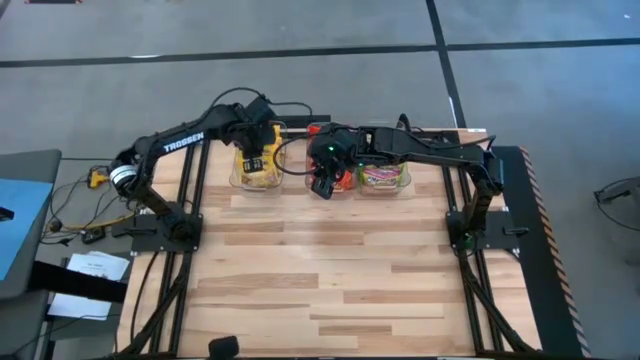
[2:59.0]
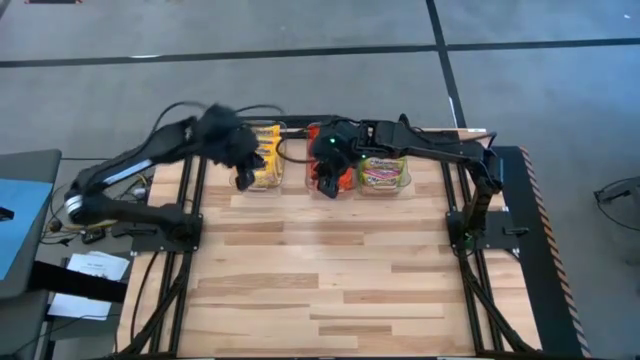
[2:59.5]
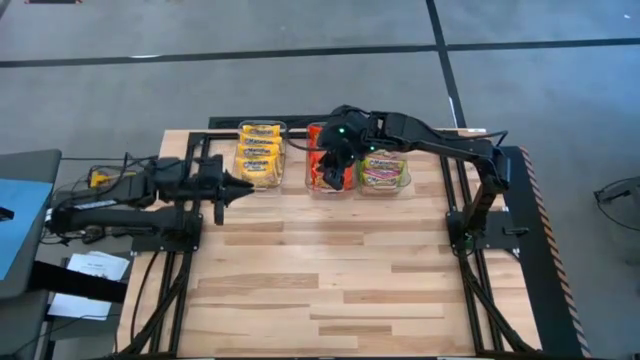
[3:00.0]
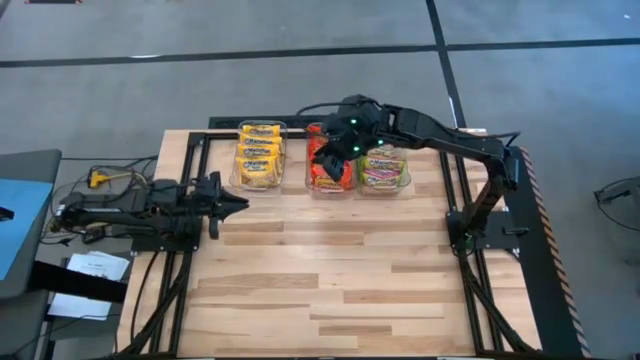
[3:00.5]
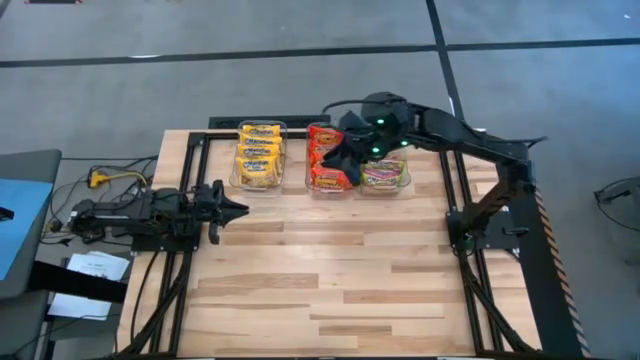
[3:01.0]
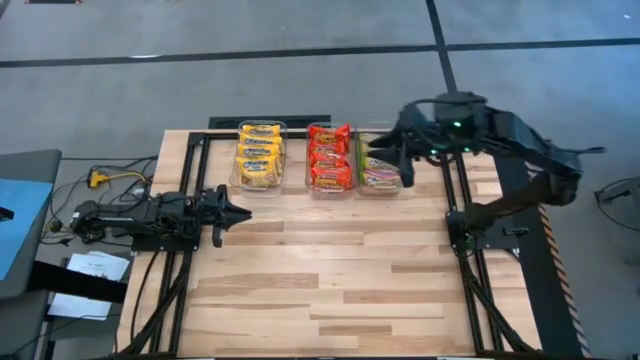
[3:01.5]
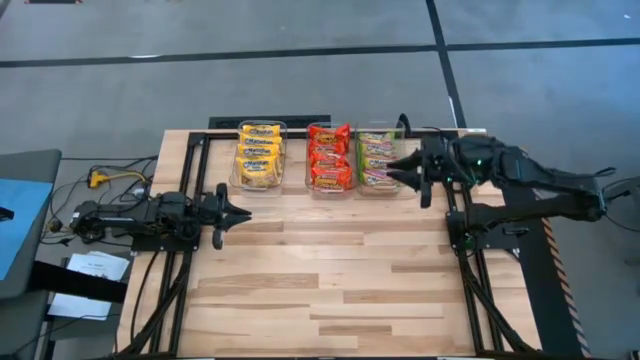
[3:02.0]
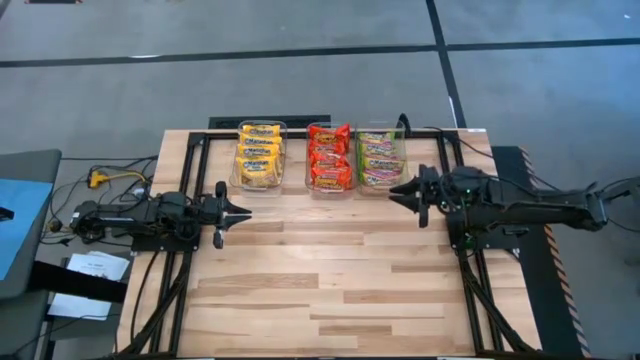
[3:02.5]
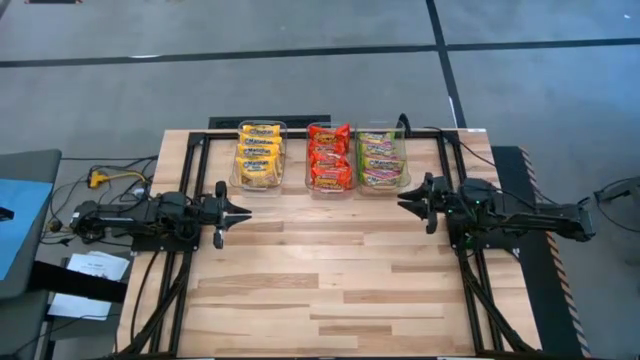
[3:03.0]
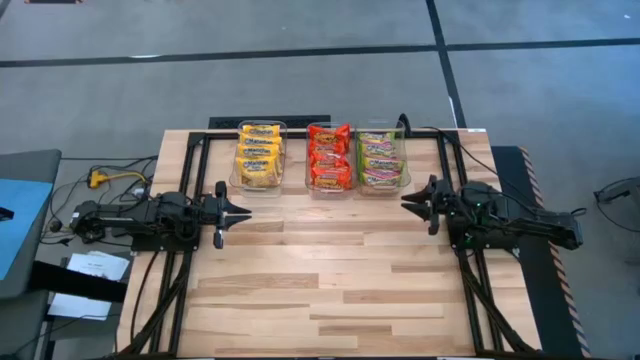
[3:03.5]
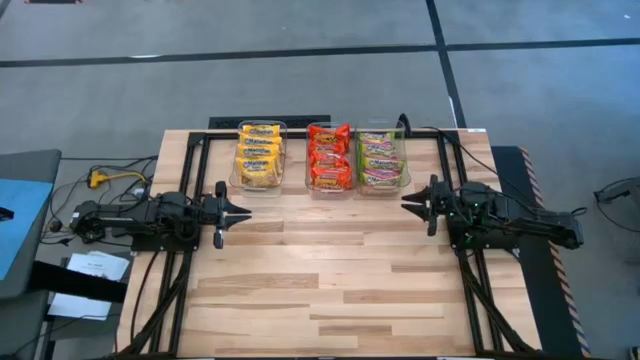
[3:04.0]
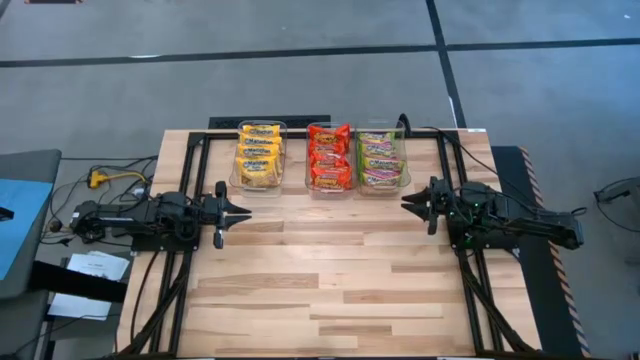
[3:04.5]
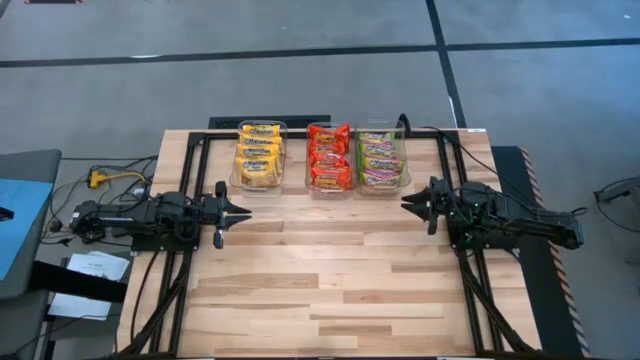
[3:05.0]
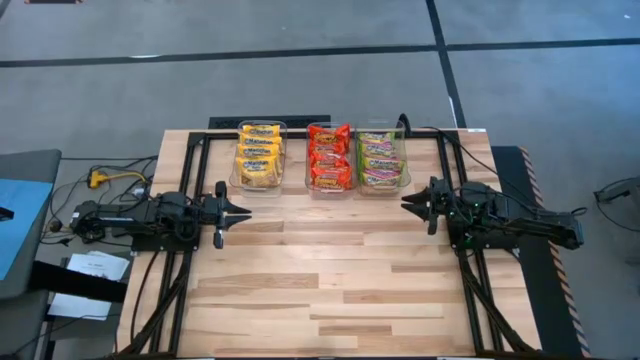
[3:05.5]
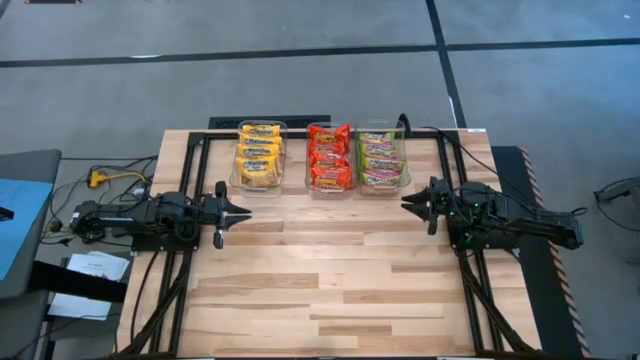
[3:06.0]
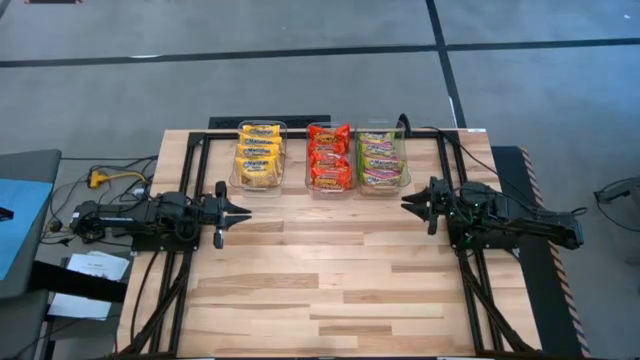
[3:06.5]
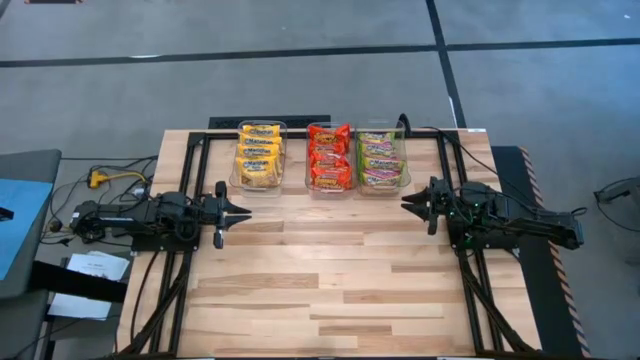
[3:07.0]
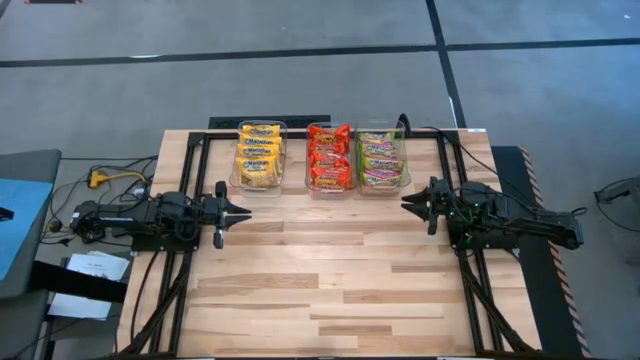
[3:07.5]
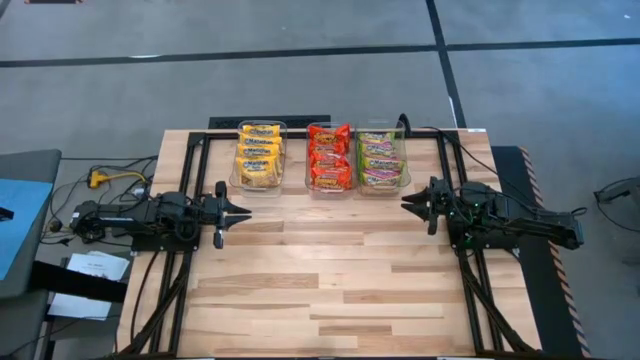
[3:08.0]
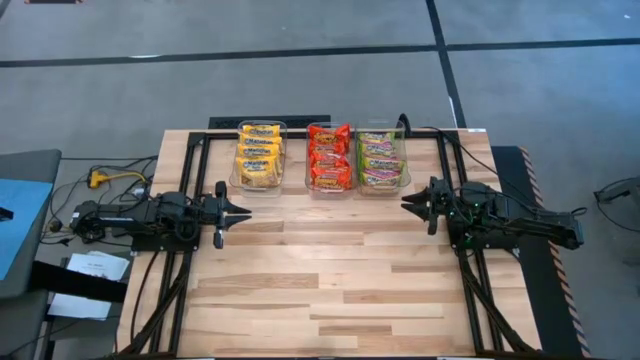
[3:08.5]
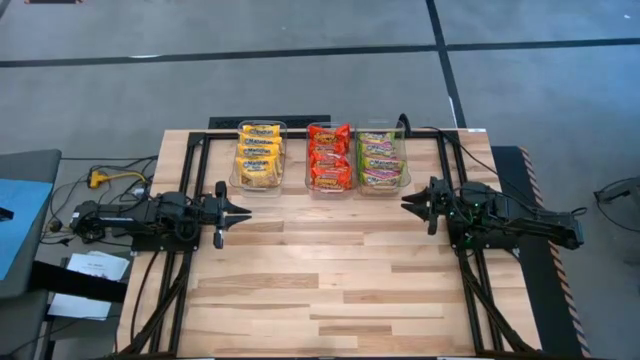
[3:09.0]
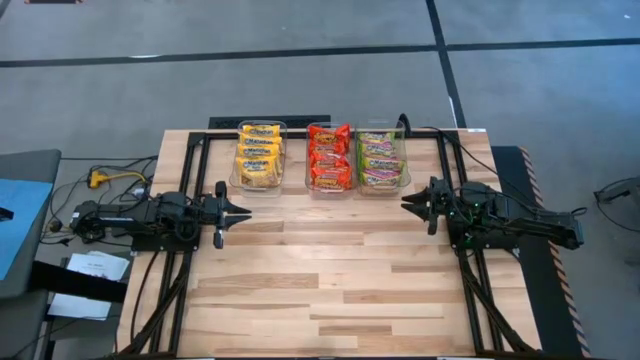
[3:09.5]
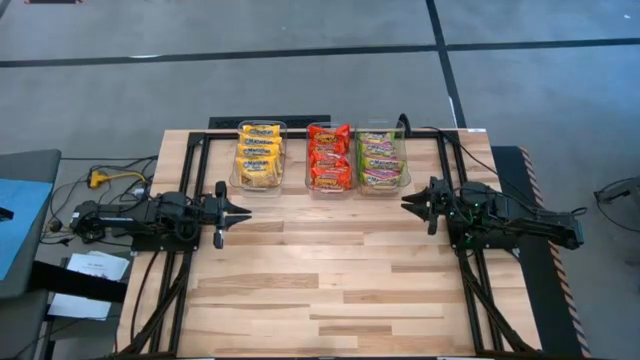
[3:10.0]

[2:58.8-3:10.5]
Task: Sort Maruchan noodles
Return to Home Position

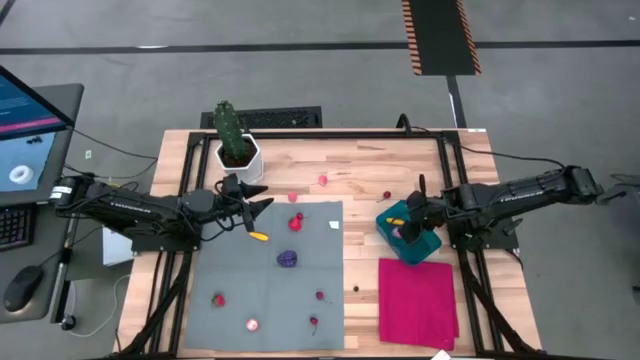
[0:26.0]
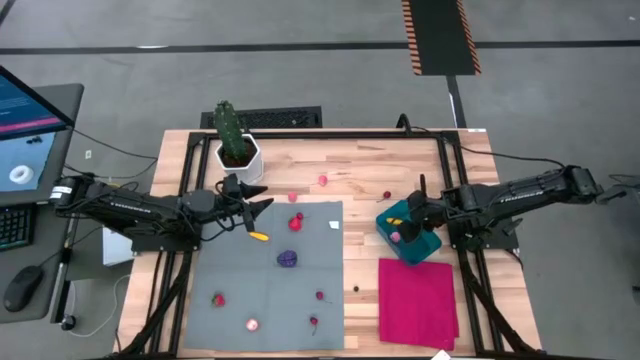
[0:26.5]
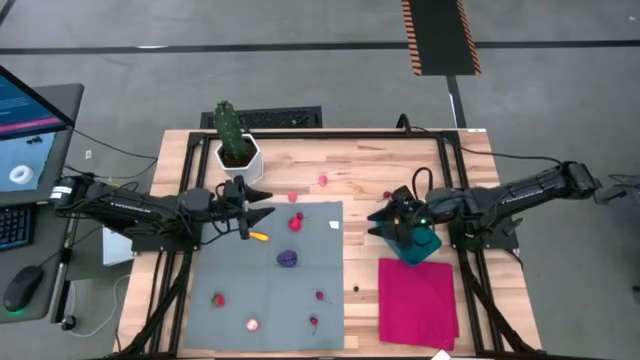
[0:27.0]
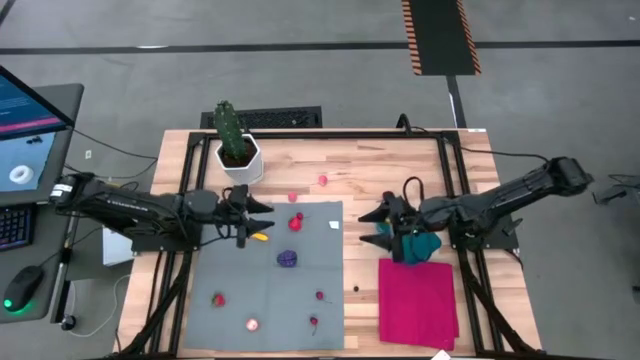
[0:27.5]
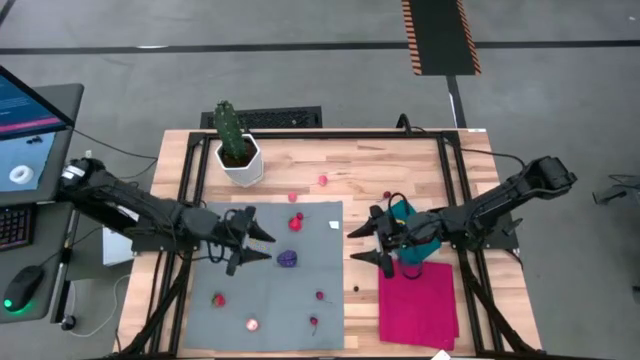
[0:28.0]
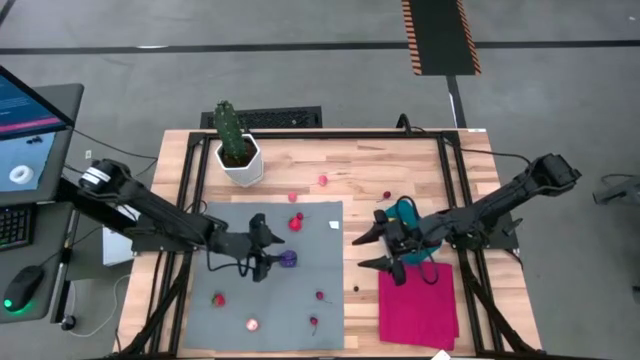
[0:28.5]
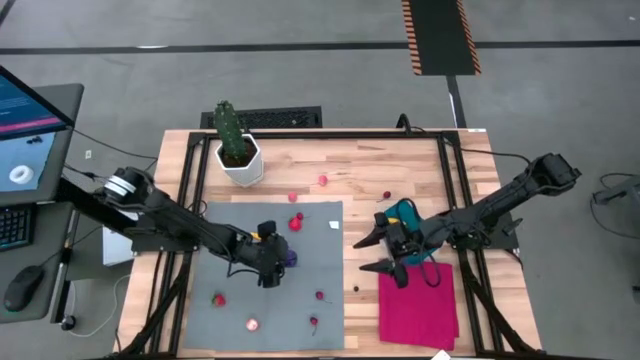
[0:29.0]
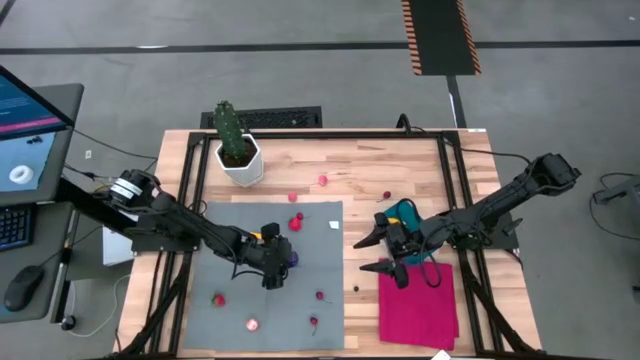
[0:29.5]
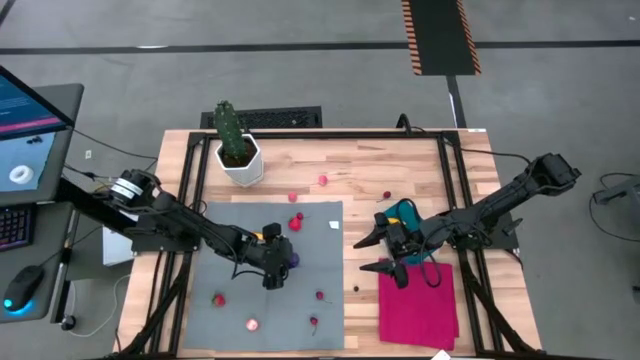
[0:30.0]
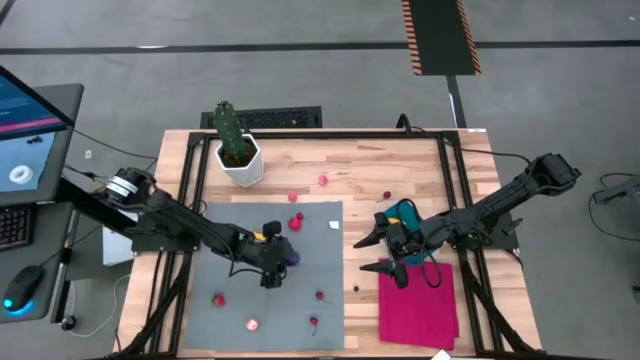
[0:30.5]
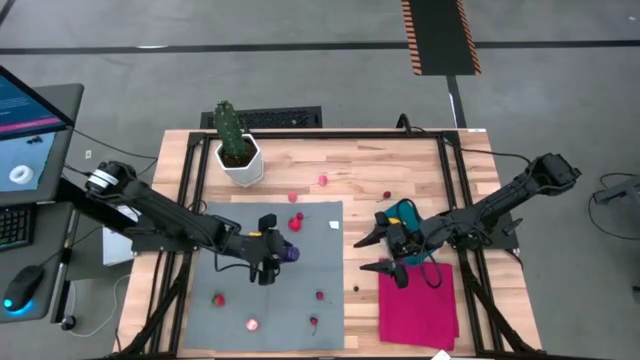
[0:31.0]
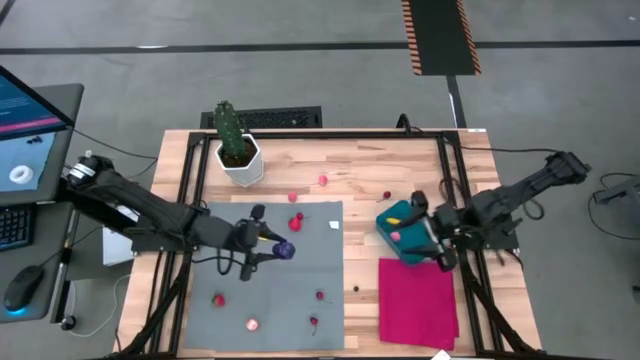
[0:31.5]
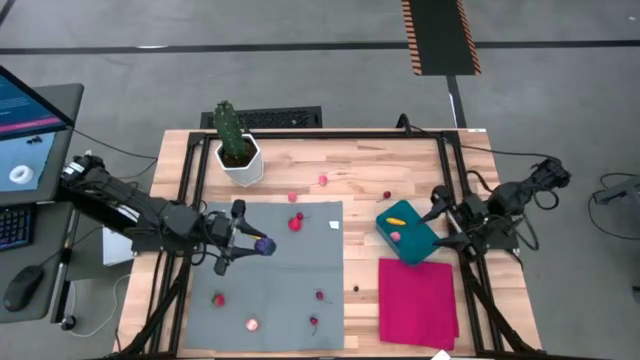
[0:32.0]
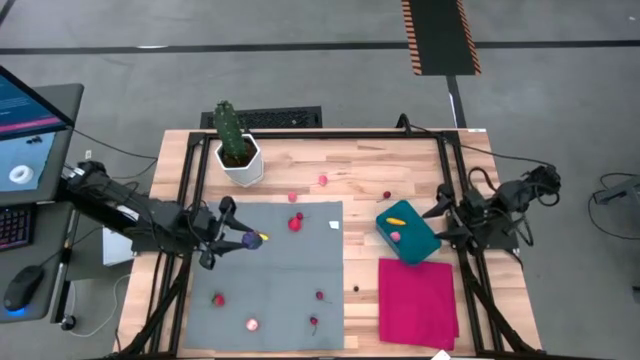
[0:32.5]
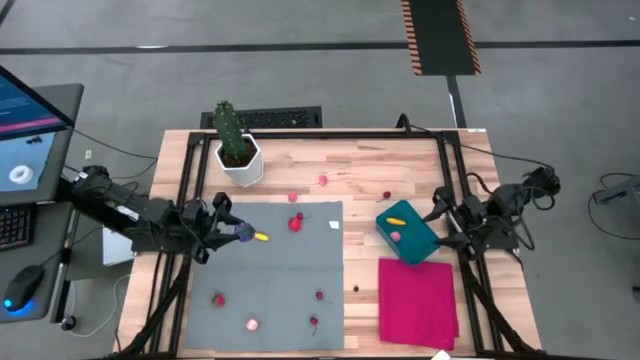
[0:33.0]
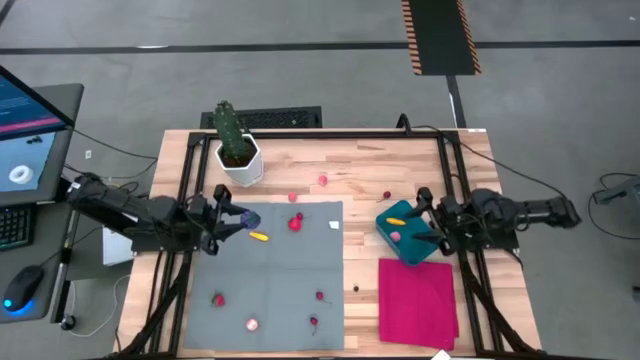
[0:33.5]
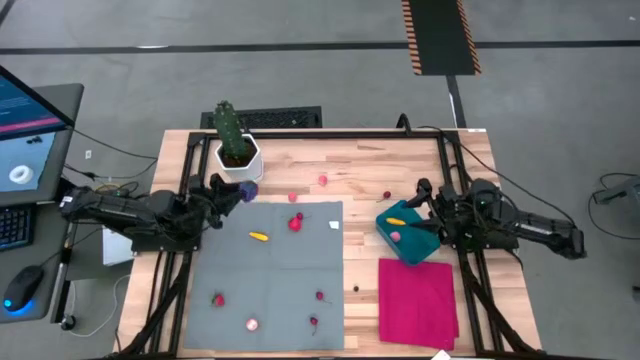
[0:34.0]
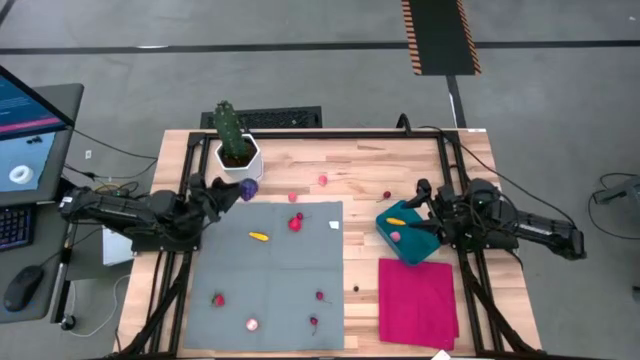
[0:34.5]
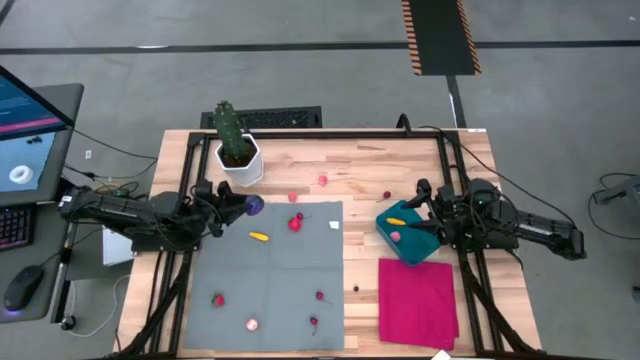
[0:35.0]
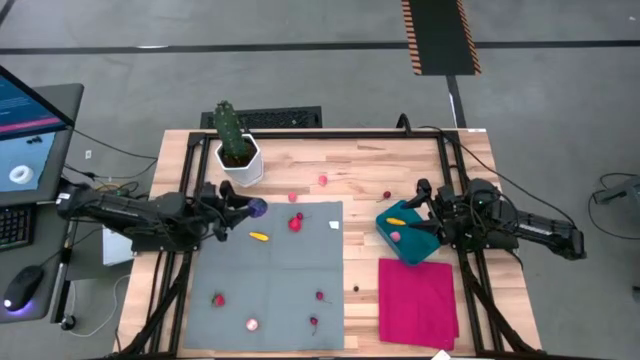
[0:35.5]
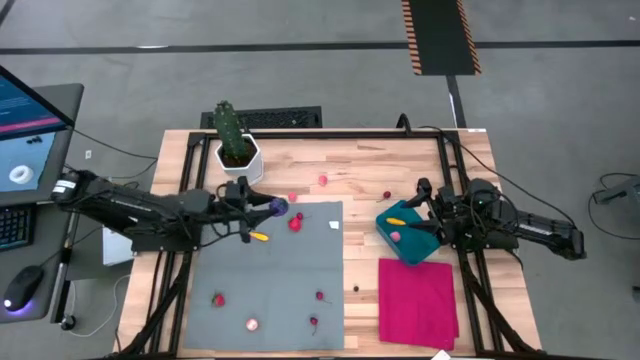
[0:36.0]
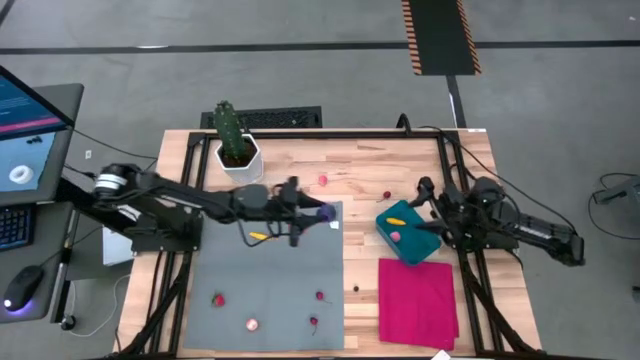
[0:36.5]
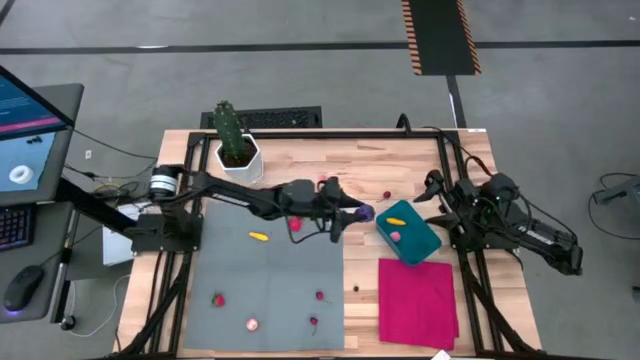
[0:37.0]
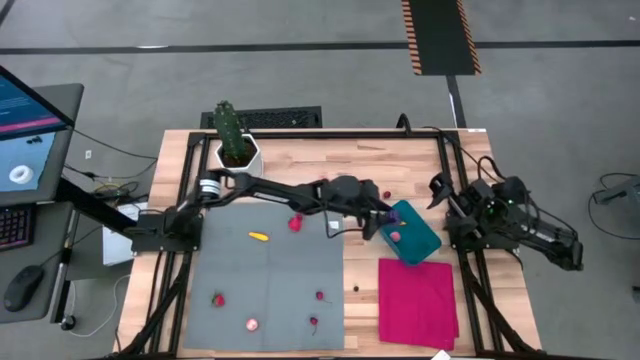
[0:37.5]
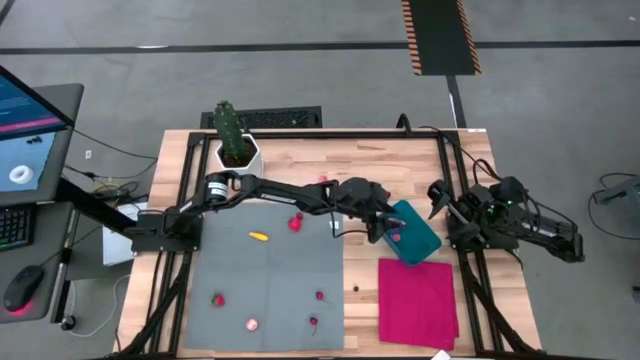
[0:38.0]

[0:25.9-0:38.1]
Task: Pick and placing Produce into tupperware
Put the purple grapes into the blue bin
